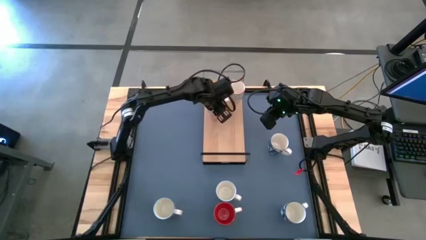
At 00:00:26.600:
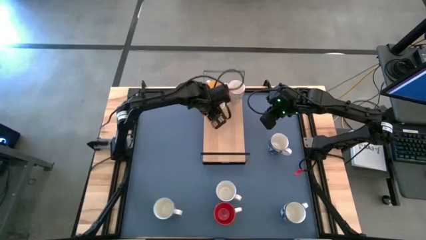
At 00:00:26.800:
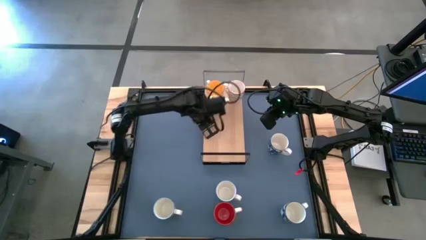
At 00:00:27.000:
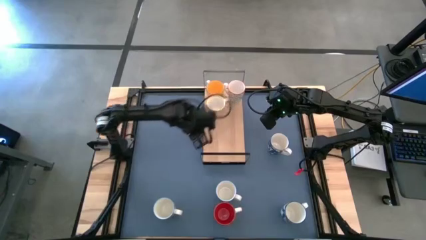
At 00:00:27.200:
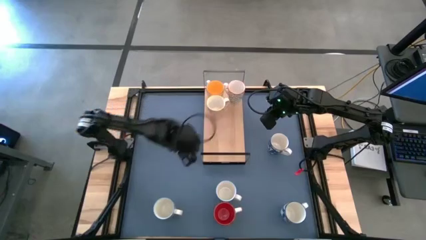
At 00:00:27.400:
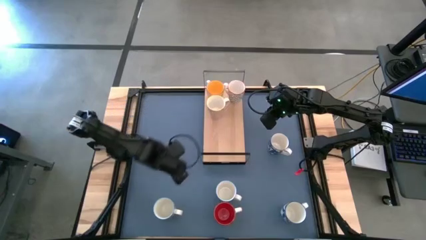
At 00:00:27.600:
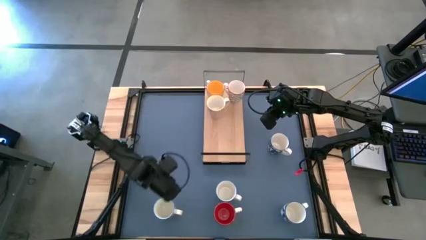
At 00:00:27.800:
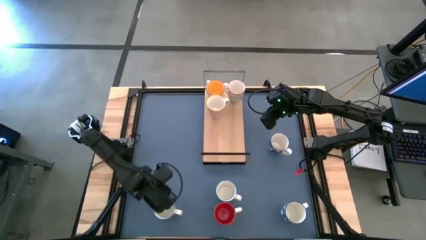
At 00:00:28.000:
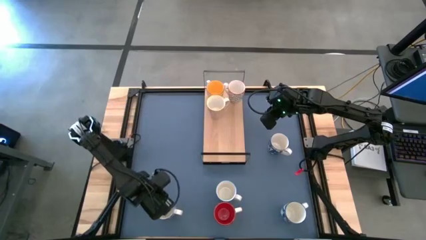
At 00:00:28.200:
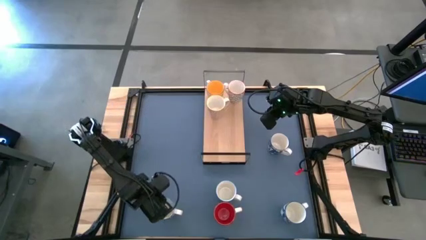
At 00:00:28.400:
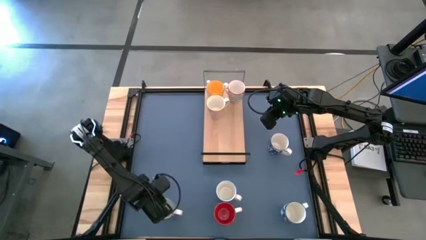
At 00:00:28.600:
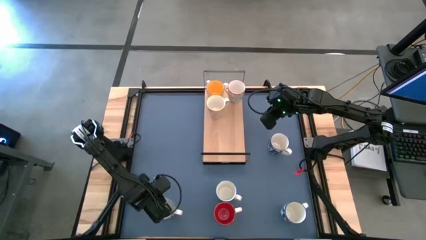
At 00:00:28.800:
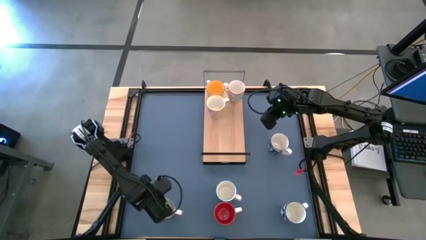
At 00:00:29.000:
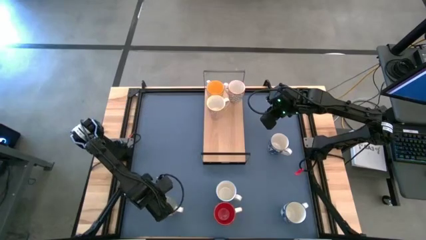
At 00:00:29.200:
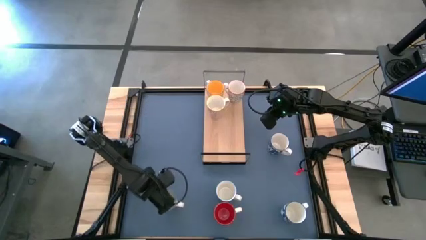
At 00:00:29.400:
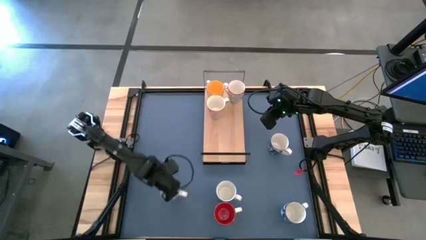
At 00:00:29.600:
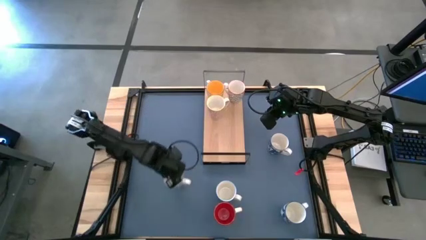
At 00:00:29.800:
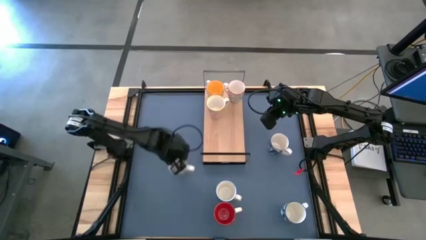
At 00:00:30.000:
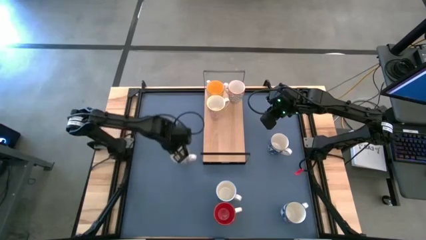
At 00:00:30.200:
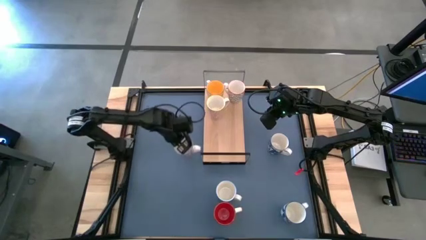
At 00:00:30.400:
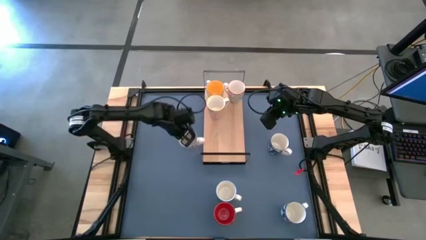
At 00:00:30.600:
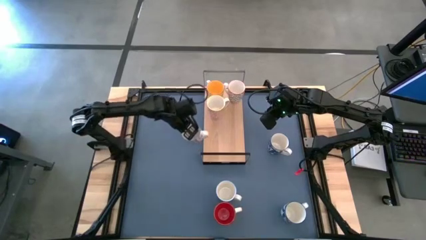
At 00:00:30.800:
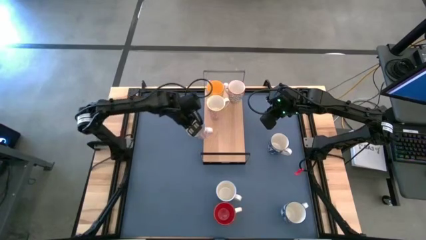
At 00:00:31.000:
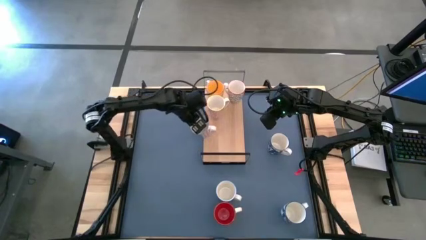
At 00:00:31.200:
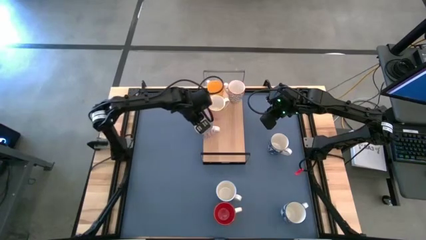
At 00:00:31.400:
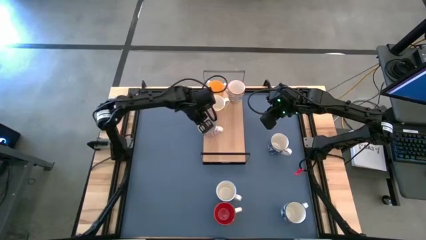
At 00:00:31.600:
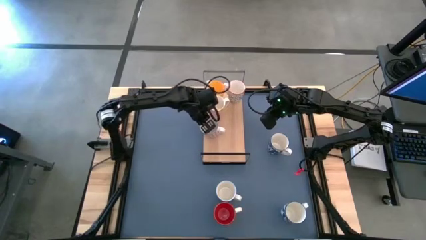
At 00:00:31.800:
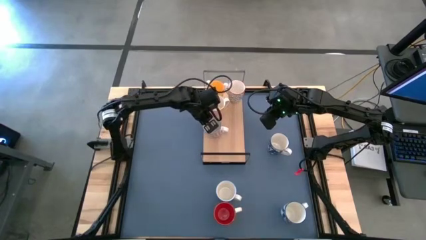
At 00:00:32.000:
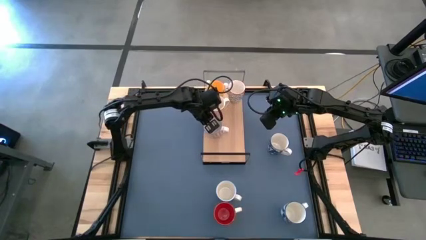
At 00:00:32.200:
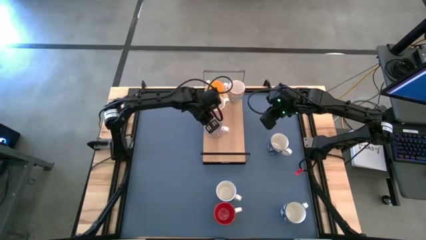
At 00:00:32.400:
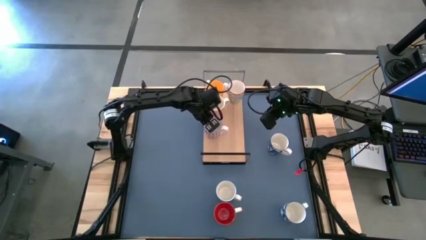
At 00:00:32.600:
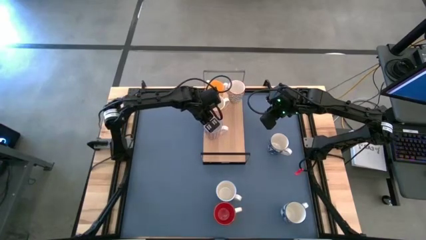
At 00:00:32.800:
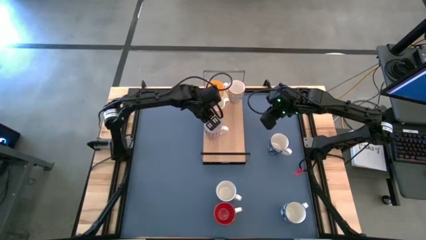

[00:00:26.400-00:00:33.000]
Task: Place coffee mugs
Put the red patterned mug on the shelf

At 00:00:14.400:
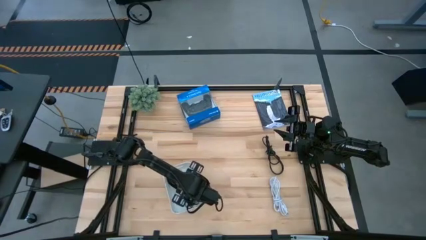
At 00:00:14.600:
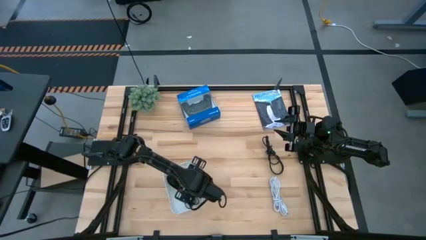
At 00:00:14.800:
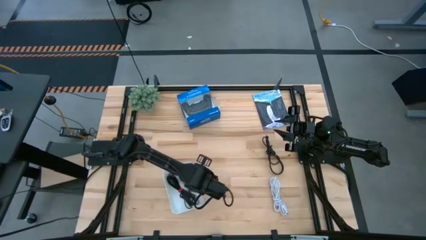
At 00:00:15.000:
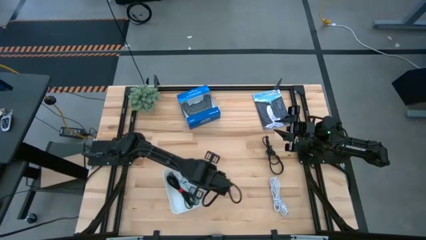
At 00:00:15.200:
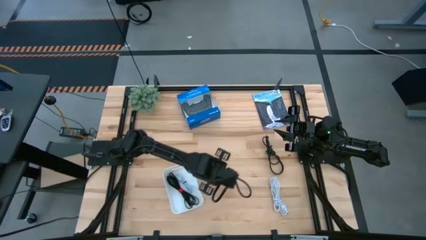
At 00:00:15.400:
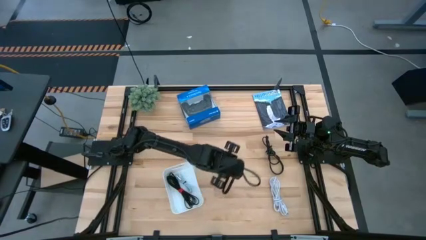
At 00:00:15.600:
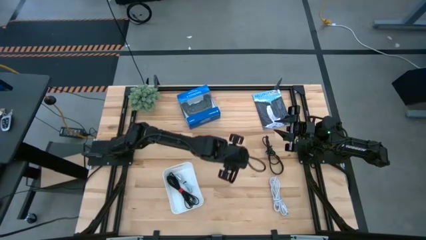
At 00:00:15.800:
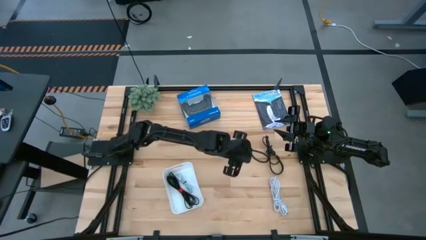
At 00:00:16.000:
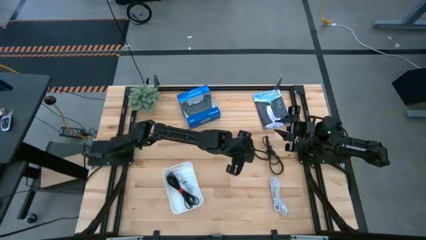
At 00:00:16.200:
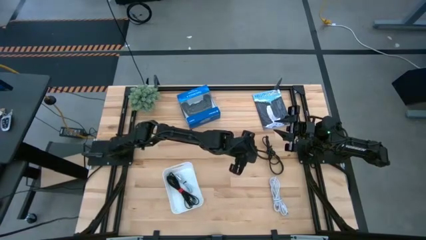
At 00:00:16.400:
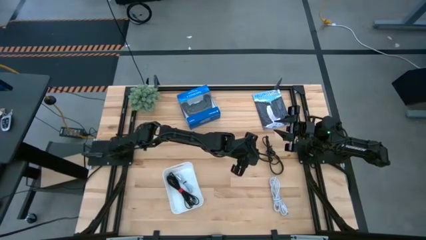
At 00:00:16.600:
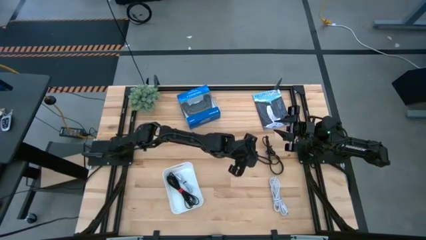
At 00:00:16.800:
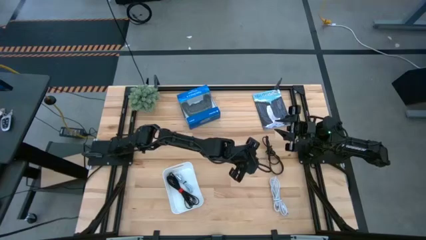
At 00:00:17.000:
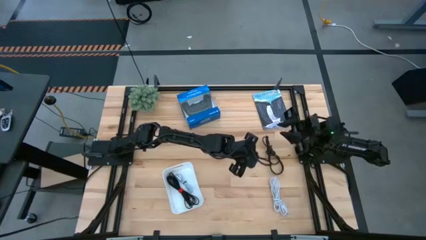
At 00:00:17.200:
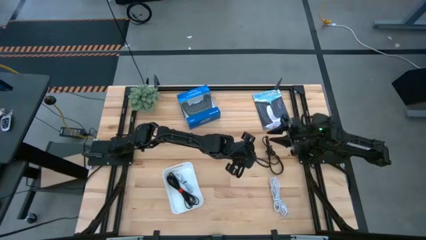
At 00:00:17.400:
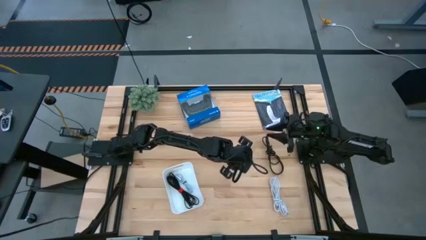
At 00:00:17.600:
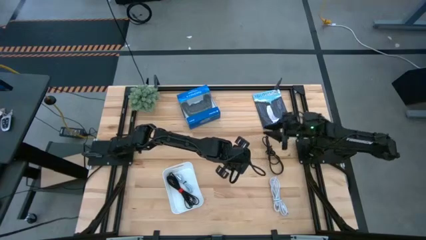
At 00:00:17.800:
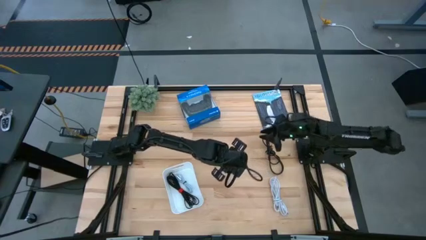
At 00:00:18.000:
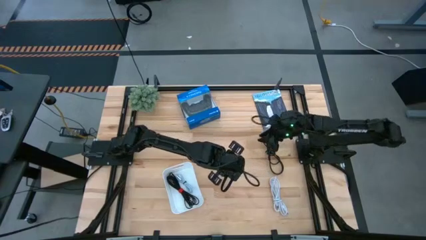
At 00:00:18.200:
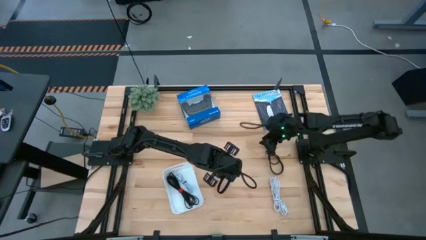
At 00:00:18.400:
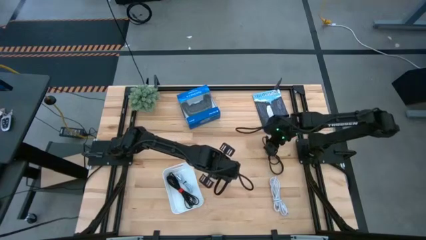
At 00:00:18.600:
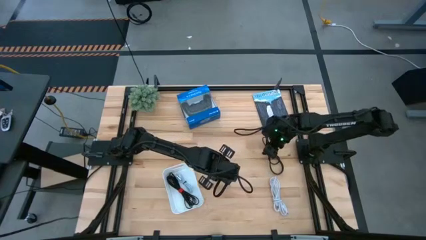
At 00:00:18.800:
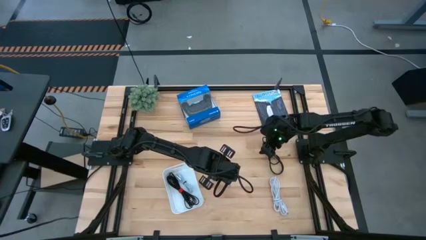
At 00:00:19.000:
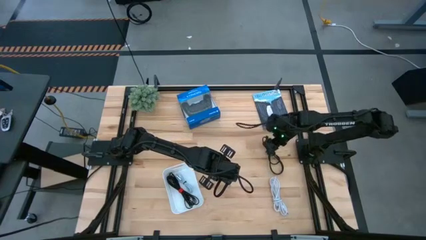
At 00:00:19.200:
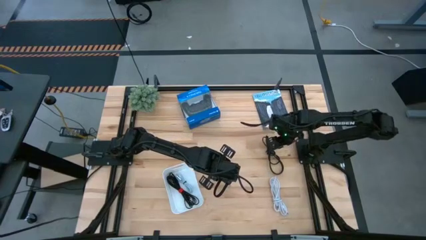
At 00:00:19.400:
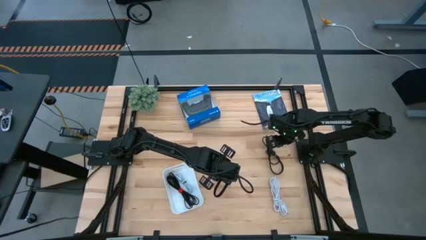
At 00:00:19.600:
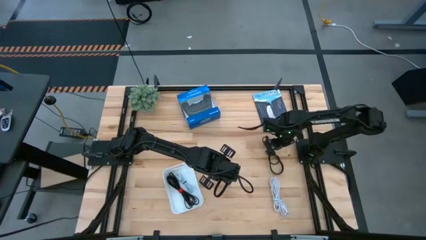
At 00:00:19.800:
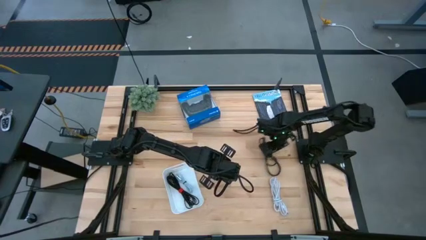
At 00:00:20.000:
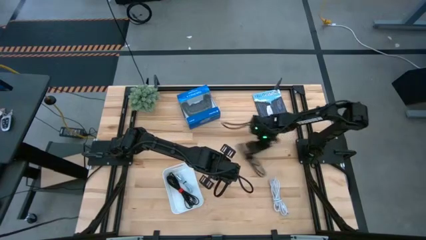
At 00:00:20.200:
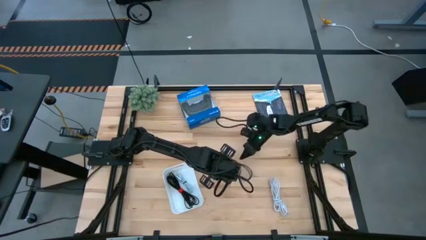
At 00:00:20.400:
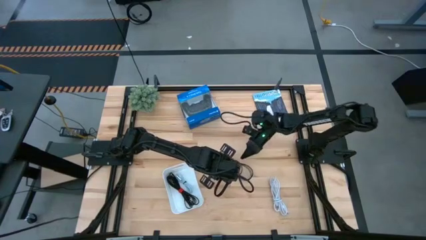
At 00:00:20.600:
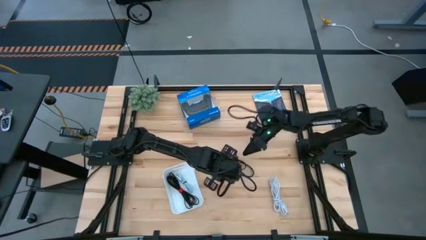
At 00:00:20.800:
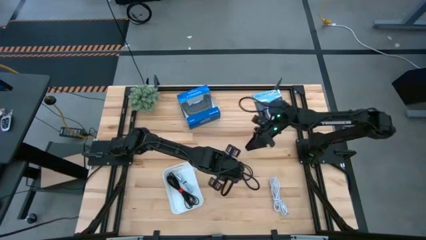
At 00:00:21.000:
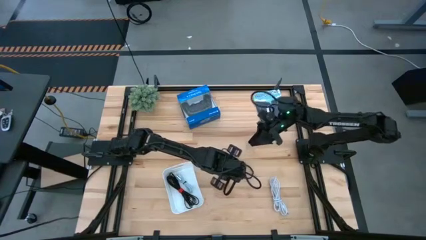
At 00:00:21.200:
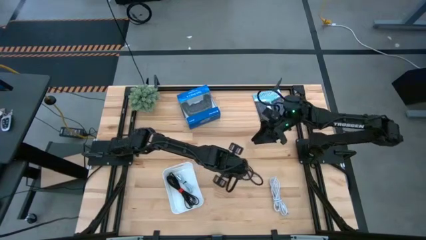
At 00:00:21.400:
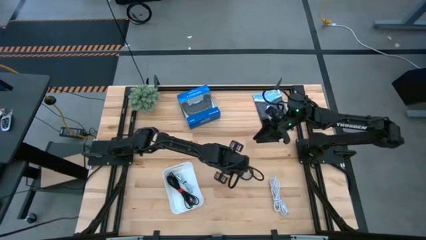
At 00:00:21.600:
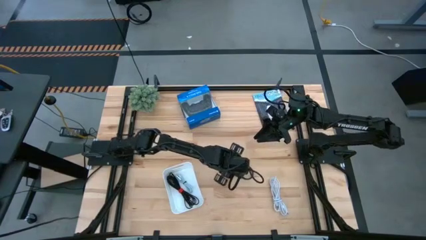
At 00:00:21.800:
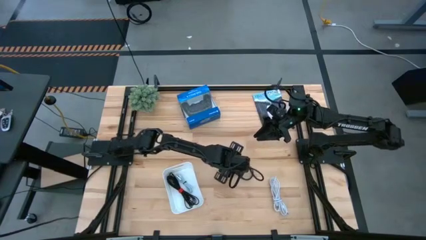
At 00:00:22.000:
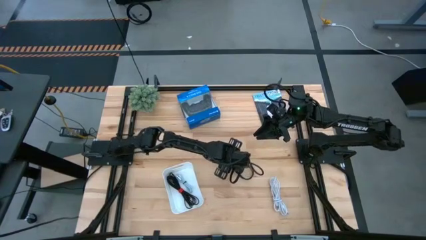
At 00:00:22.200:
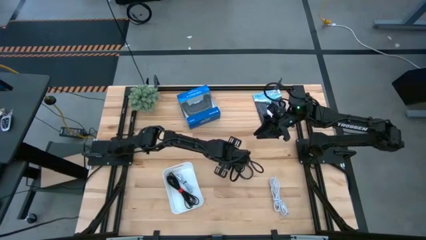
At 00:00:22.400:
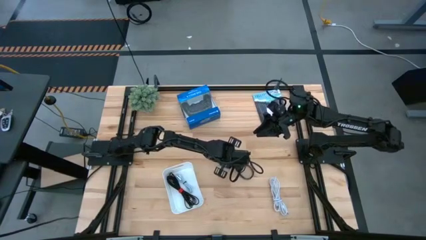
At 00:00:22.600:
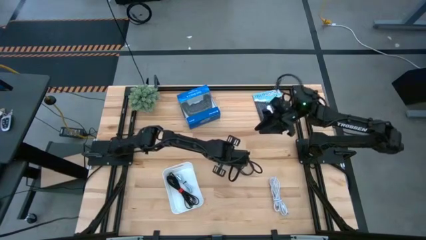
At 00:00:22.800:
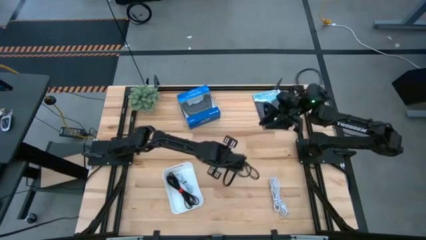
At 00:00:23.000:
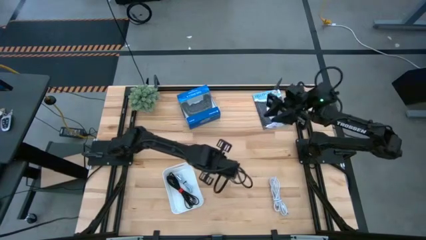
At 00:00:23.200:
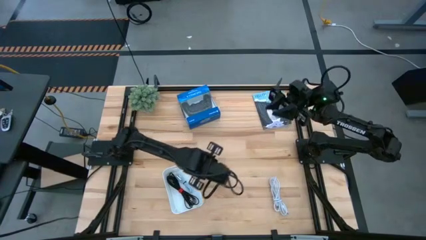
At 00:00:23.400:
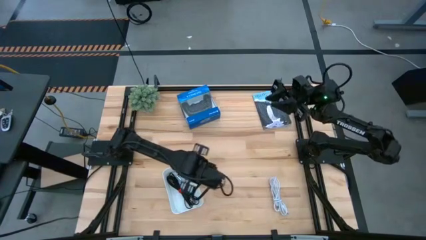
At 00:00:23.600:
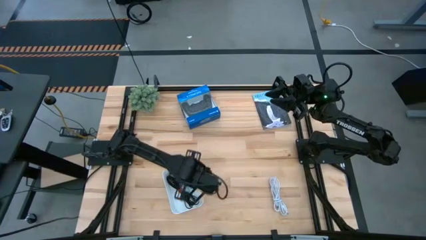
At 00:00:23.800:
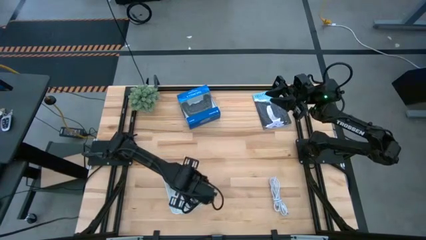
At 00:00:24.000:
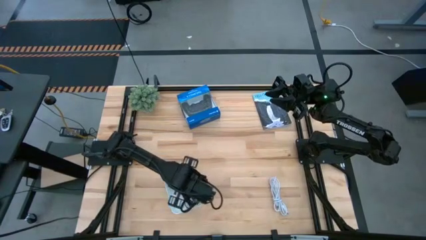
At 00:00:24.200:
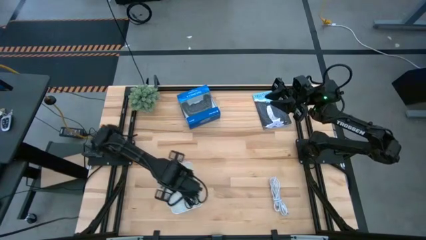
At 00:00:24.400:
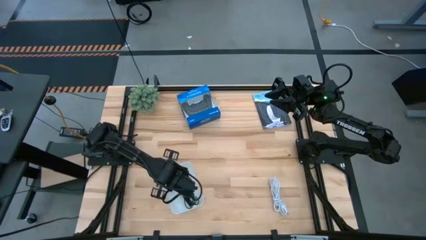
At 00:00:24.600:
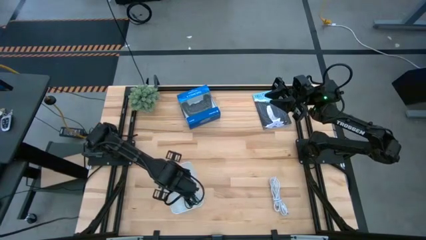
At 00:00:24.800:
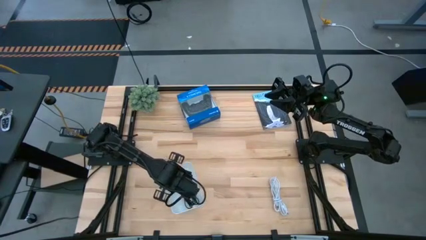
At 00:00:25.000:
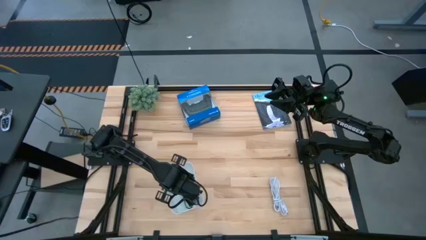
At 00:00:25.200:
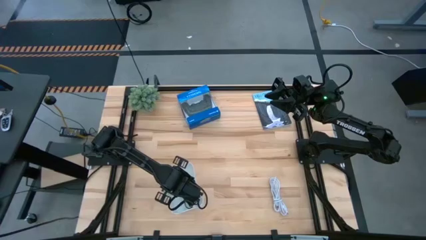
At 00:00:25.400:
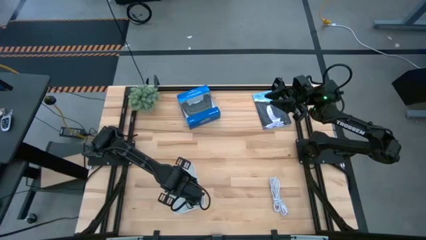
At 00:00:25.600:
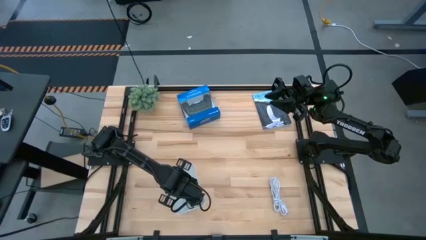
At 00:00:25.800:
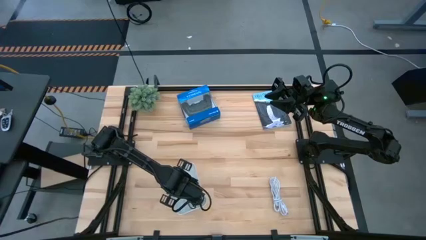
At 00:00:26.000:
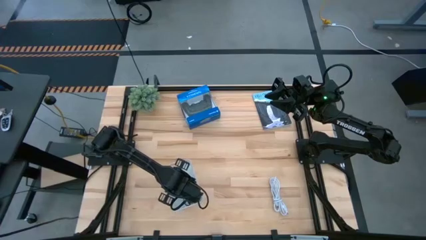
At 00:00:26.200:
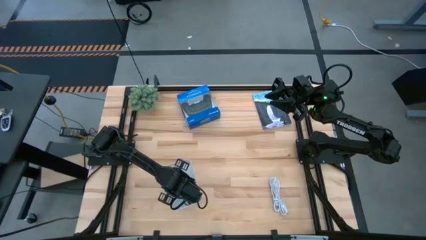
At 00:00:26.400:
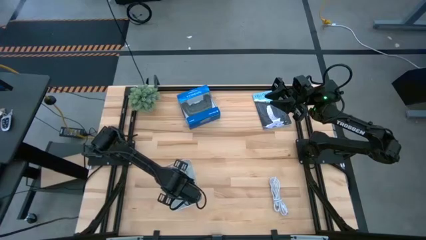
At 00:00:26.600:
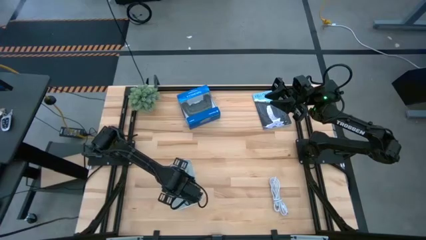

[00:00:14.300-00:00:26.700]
Task: Pick and place USB-C Cables
Put the black charger cable into the bin
